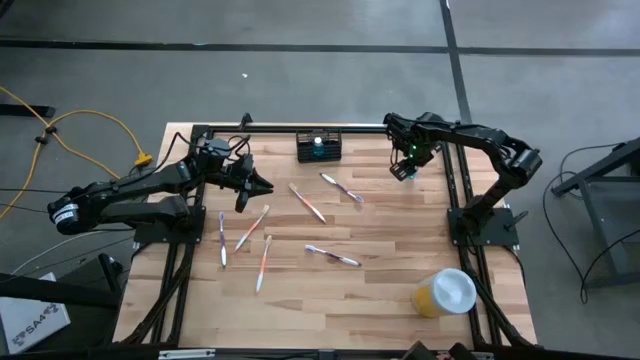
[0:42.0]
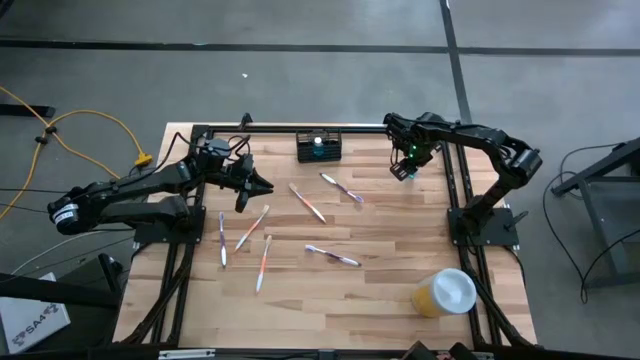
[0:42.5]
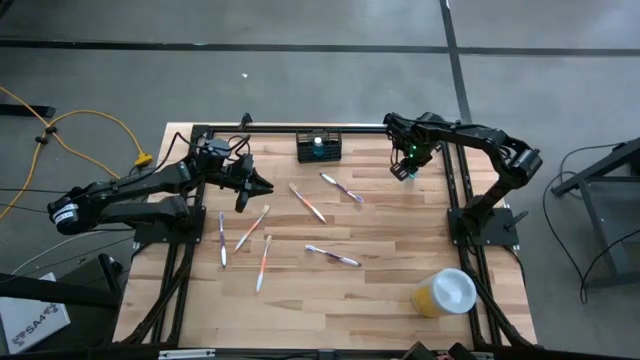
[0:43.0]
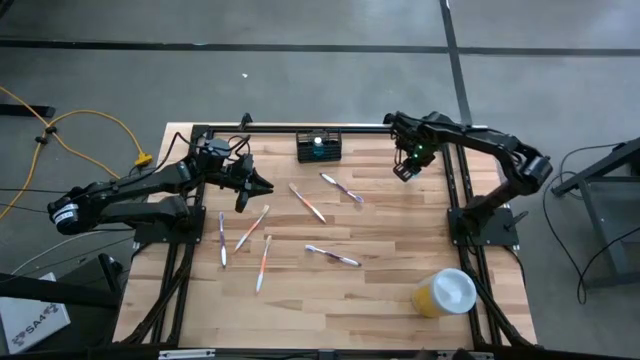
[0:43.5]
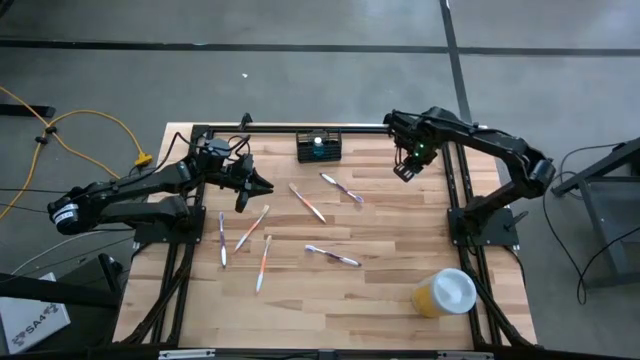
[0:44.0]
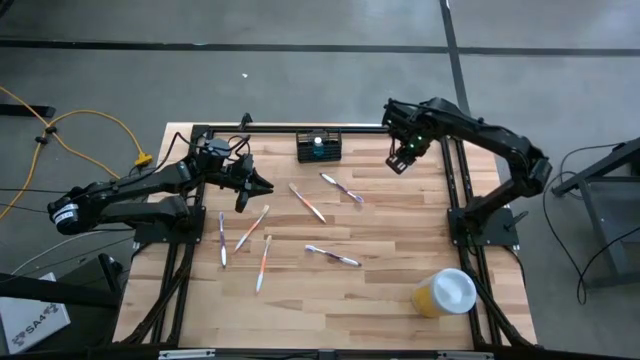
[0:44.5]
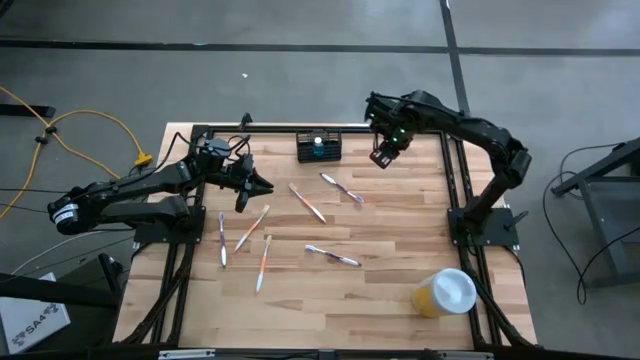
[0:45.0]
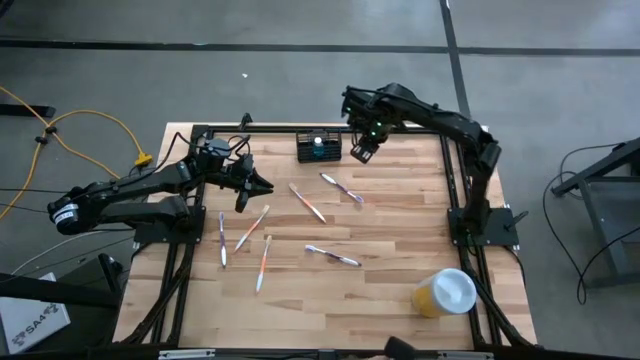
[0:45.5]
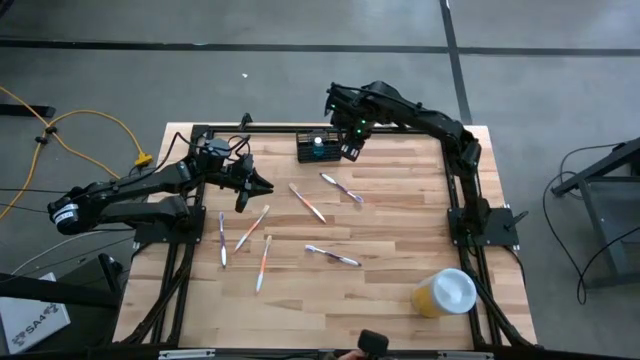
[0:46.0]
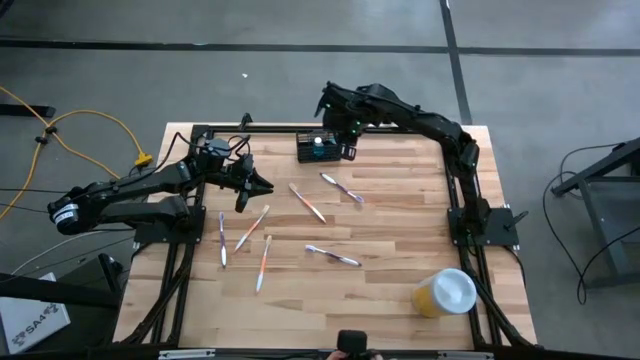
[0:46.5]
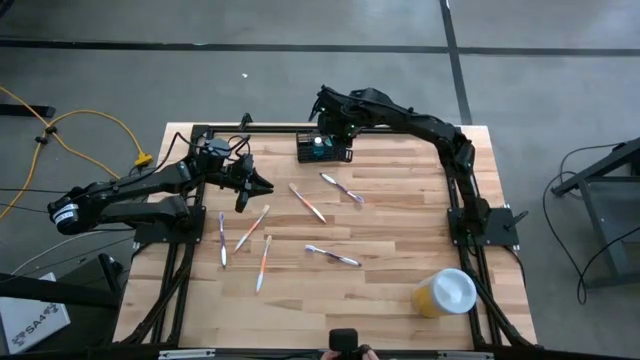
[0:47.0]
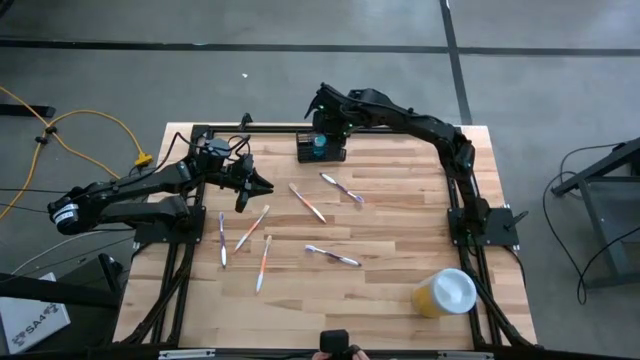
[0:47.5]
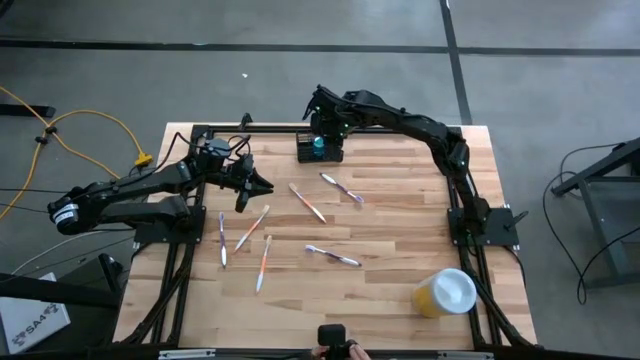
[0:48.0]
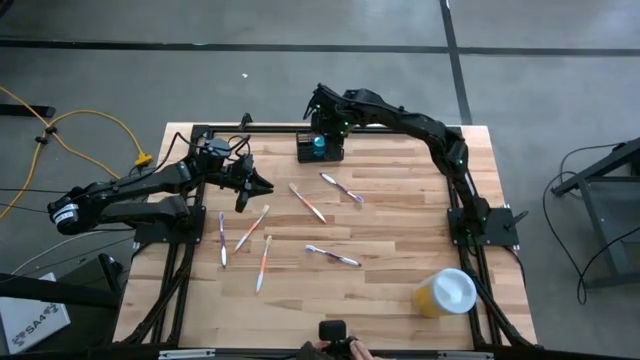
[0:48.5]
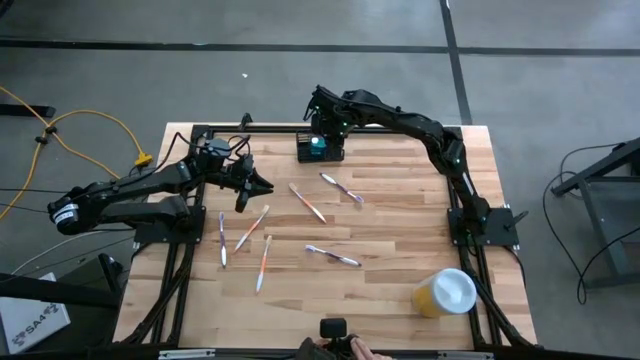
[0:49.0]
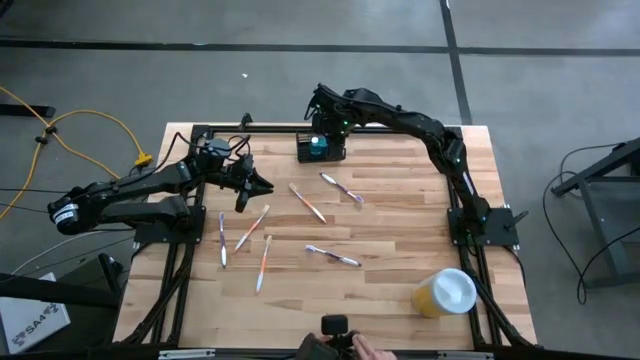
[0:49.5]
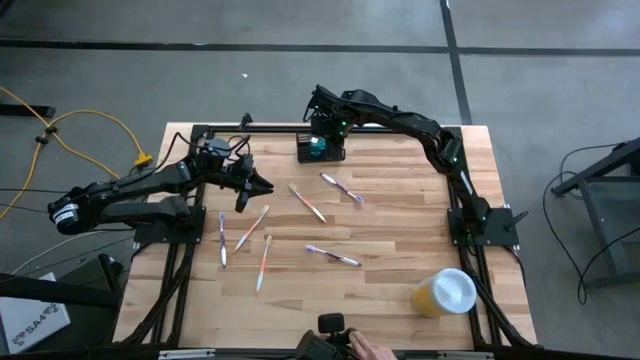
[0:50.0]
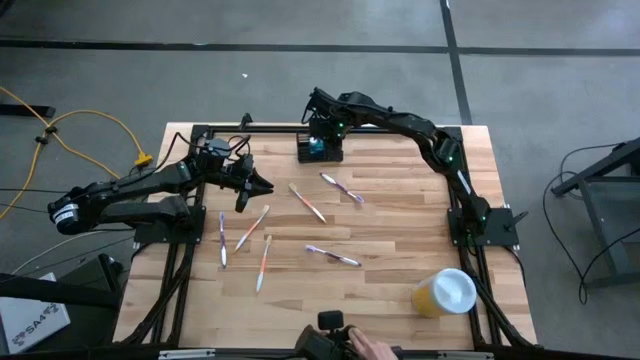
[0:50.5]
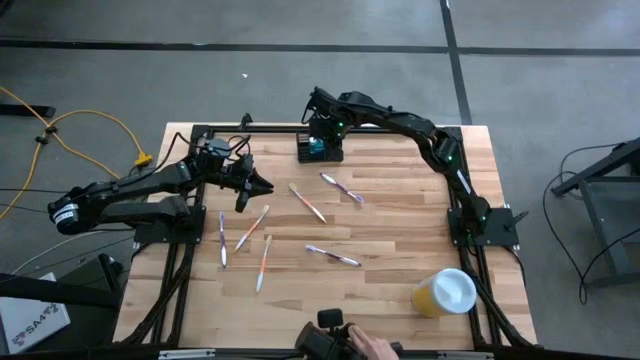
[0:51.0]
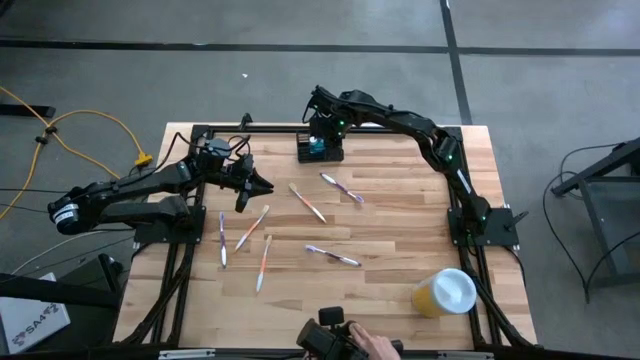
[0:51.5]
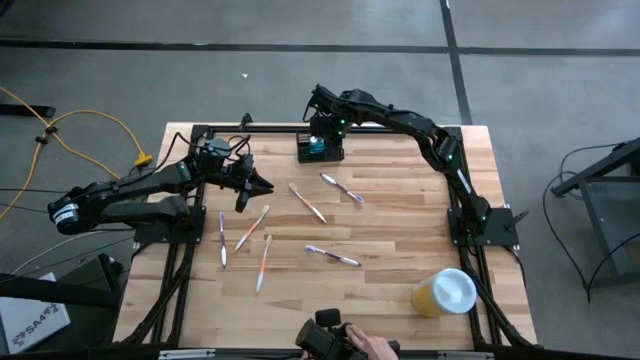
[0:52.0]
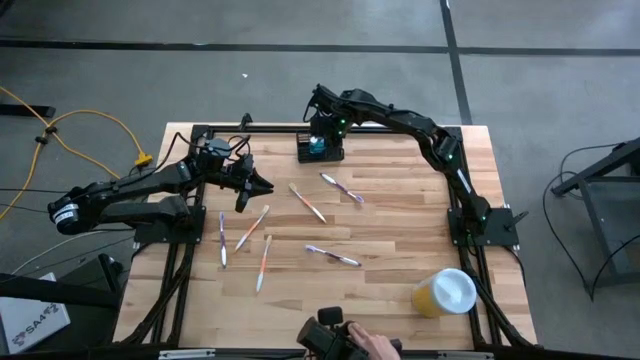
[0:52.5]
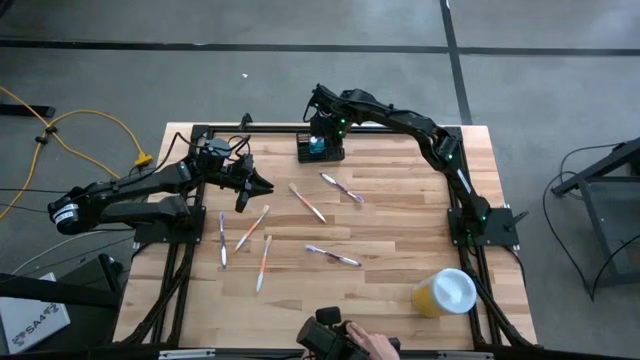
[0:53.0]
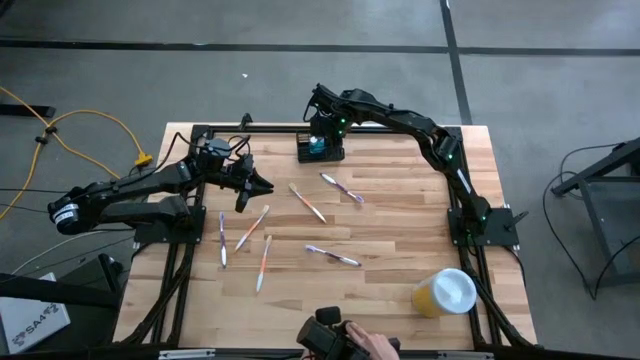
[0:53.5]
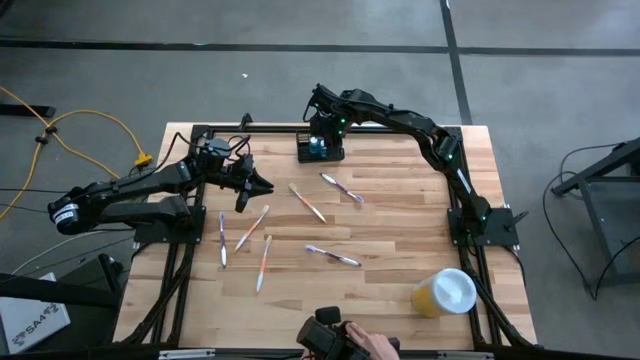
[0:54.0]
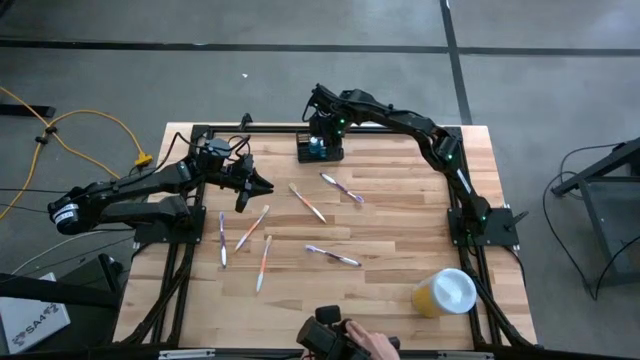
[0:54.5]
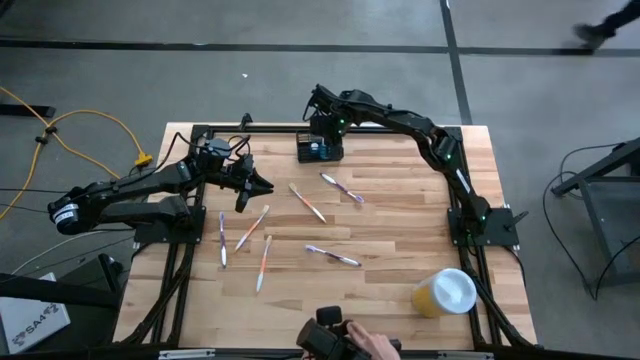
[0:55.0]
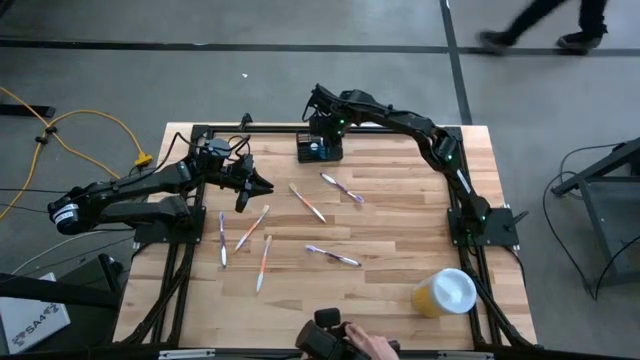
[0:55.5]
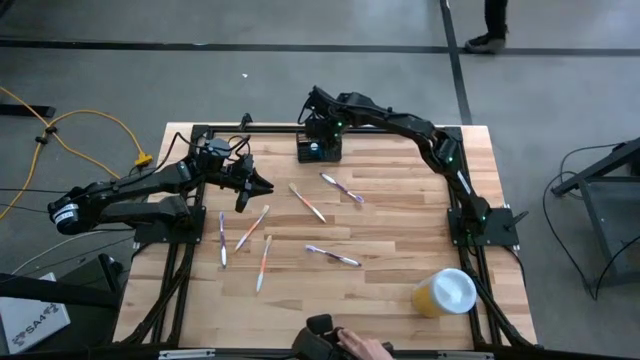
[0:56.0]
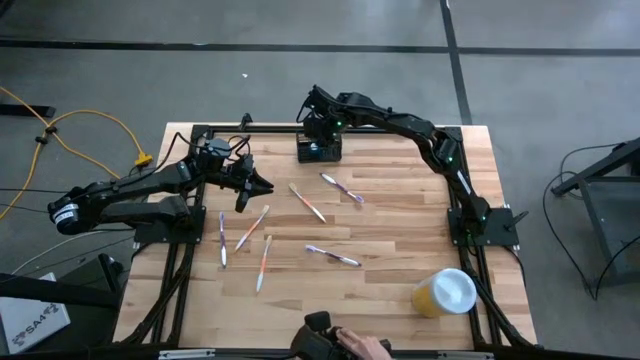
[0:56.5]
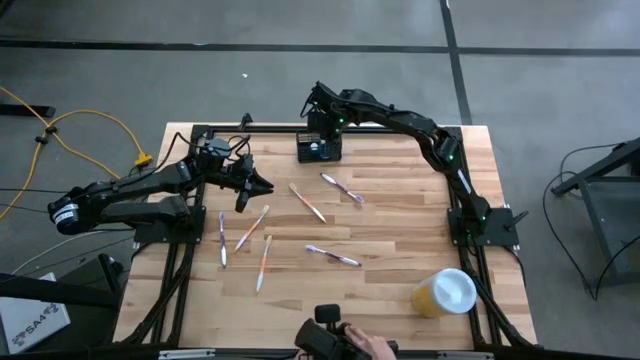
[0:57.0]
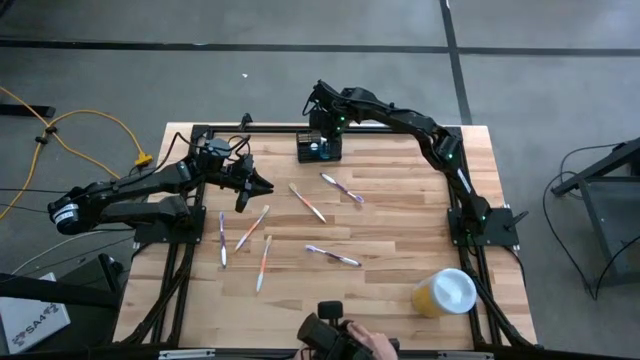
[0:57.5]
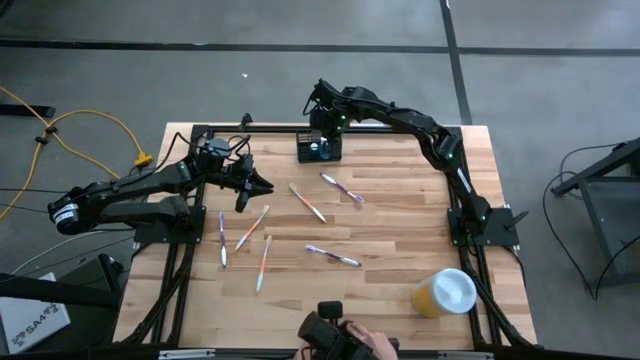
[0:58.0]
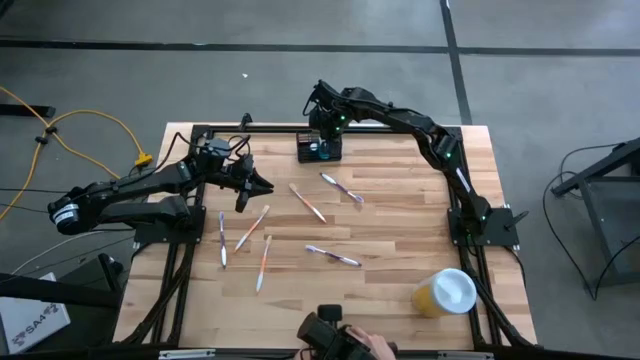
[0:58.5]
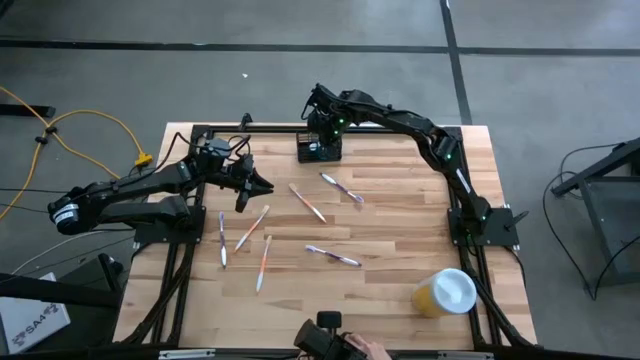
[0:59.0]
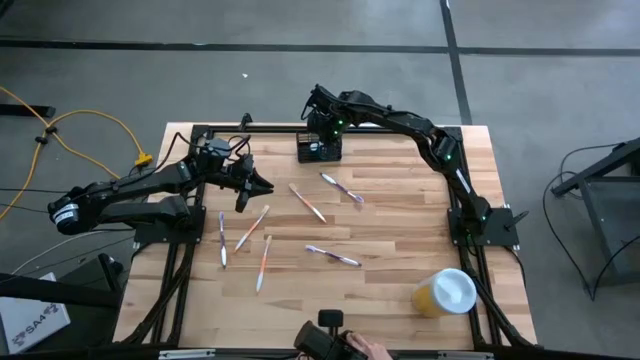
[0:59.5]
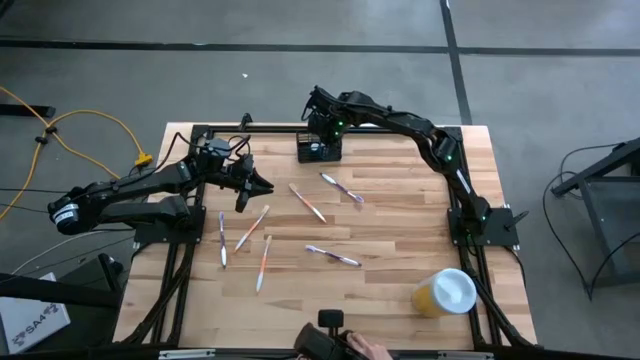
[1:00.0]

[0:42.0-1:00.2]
Task: Pick & Place toothbrushing station
Put the blue mouthwash into the wire organizer

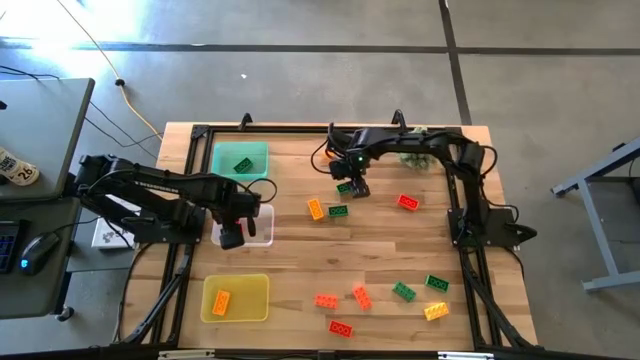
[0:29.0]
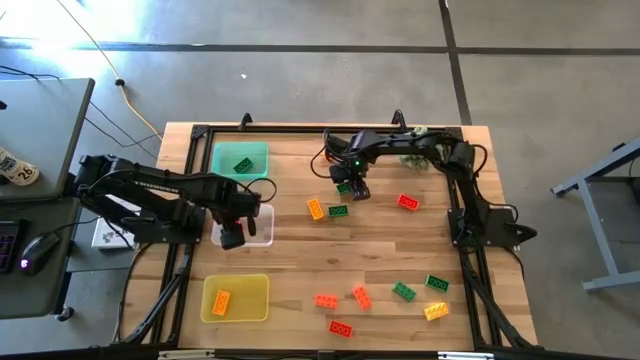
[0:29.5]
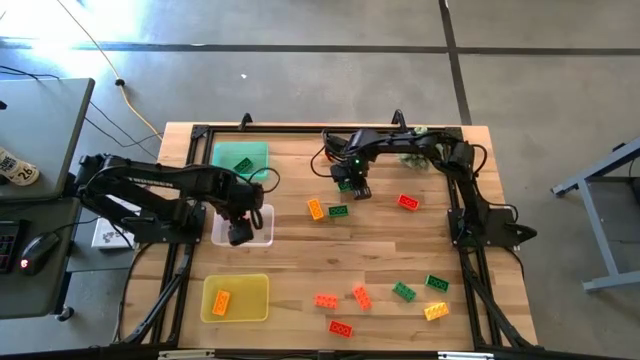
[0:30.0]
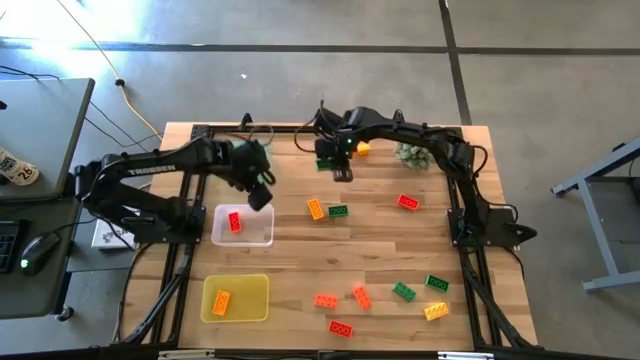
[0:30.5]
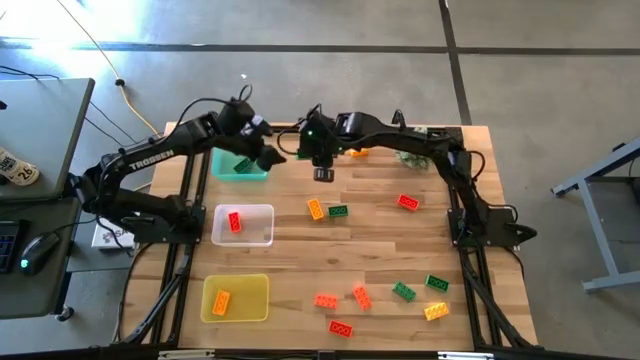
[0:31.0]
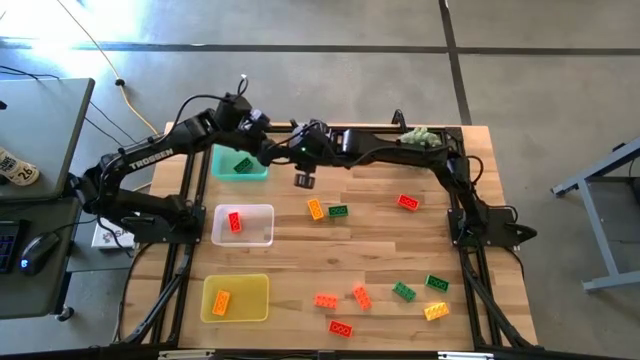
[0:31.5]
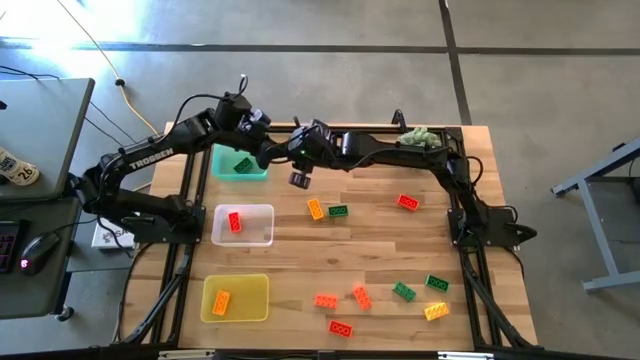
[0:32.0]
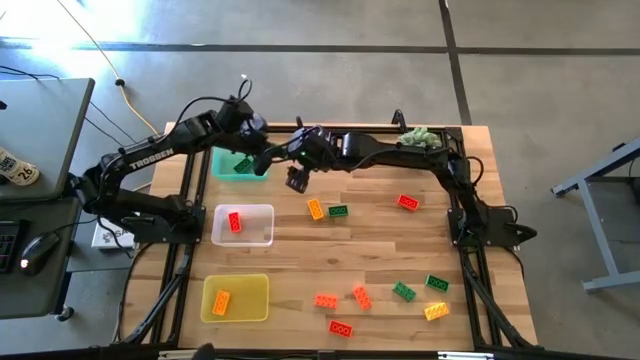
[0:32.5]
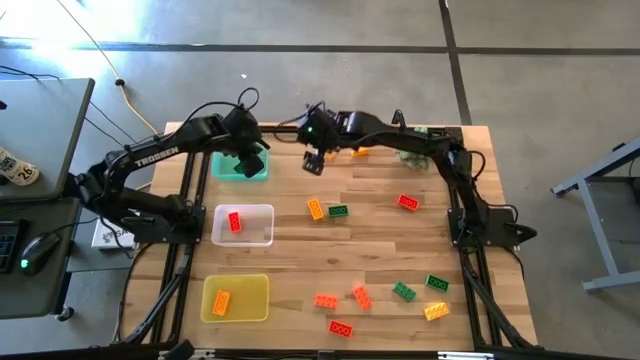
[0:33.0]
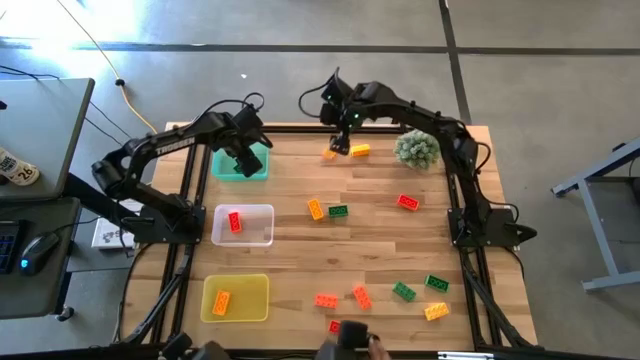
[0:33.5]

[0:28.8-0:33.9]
Task: Sort & place blocks by color
Put the green game piece into the green bin
